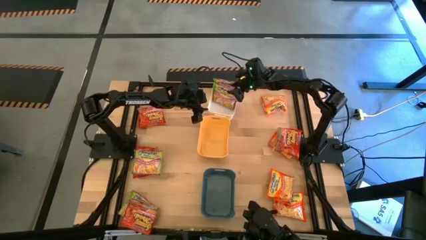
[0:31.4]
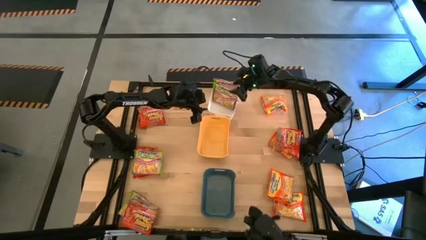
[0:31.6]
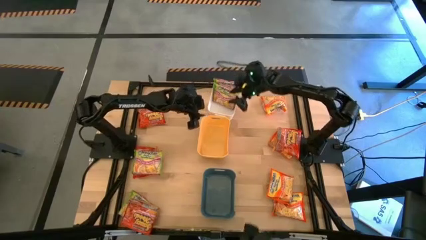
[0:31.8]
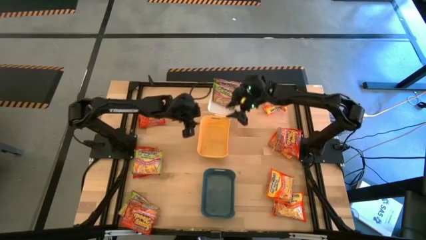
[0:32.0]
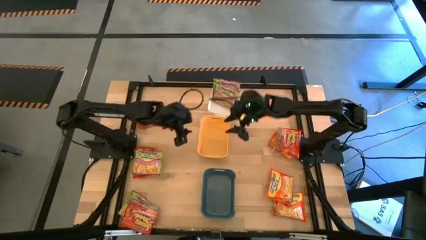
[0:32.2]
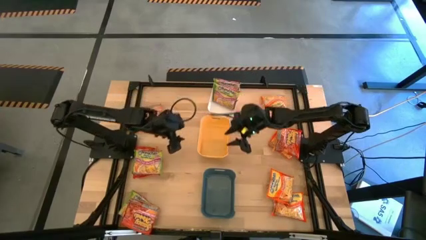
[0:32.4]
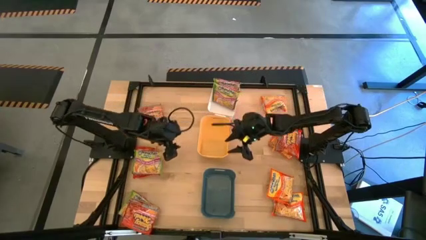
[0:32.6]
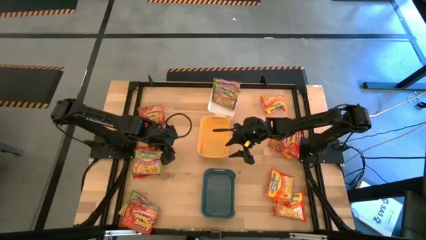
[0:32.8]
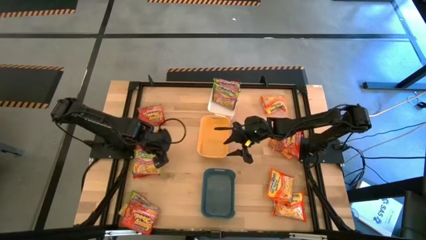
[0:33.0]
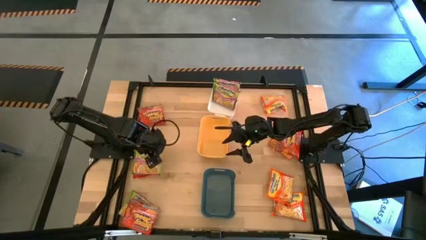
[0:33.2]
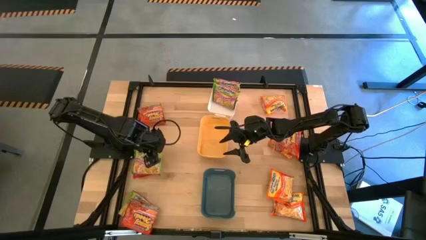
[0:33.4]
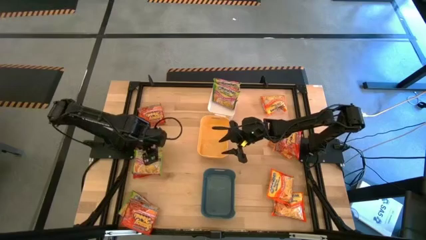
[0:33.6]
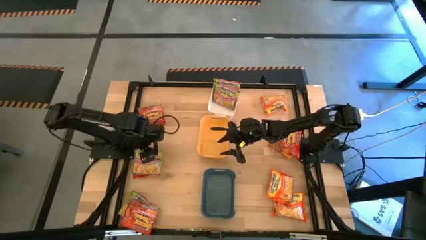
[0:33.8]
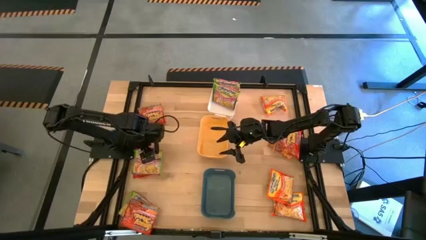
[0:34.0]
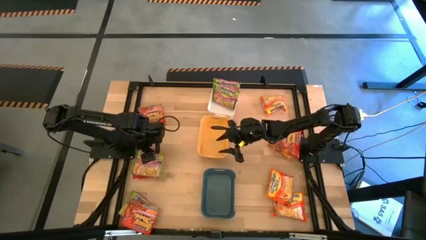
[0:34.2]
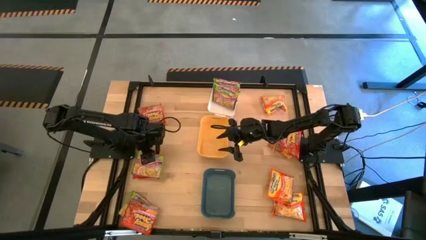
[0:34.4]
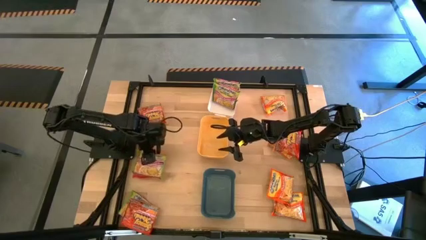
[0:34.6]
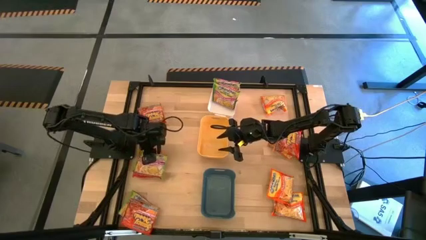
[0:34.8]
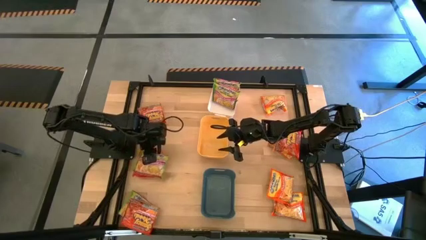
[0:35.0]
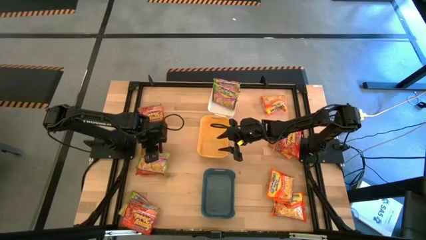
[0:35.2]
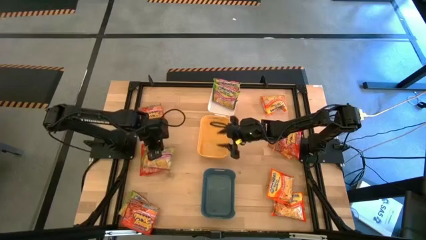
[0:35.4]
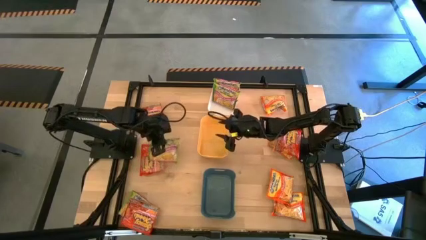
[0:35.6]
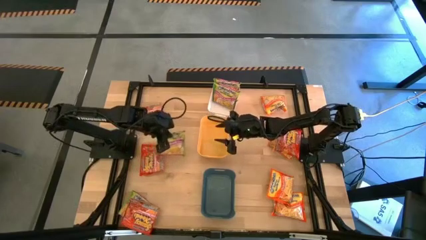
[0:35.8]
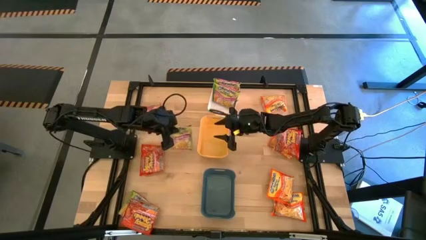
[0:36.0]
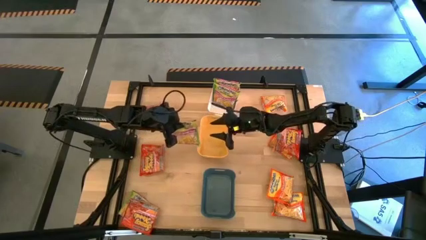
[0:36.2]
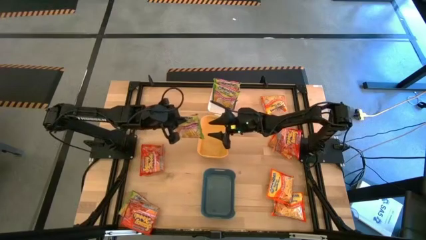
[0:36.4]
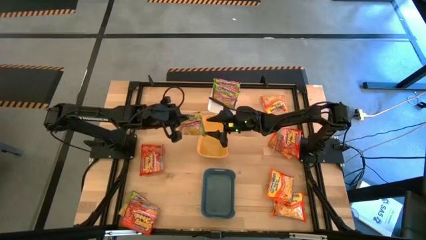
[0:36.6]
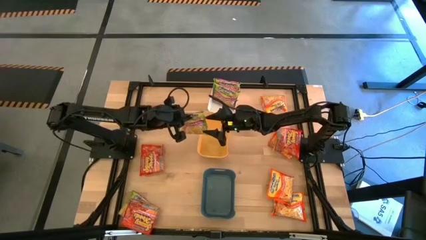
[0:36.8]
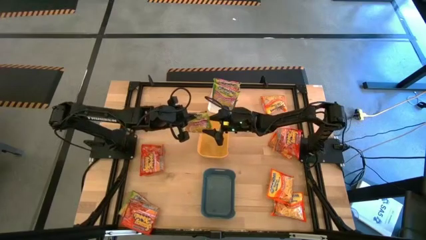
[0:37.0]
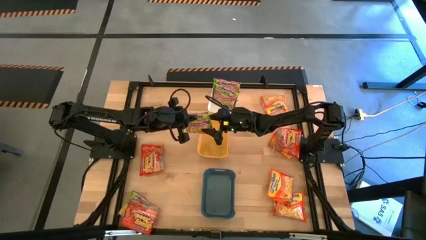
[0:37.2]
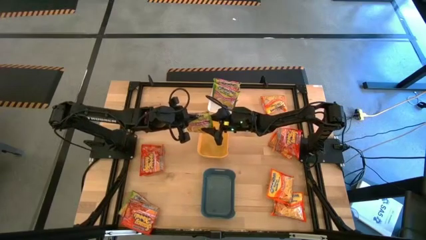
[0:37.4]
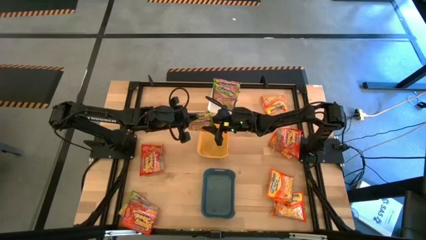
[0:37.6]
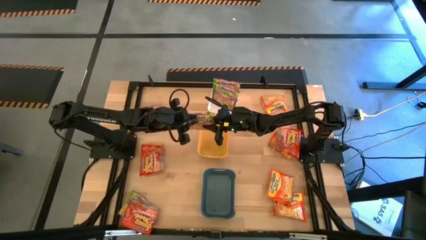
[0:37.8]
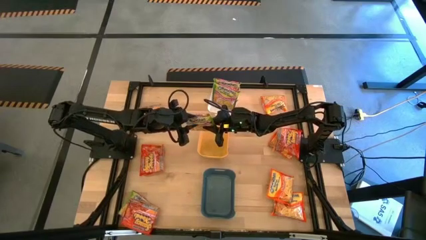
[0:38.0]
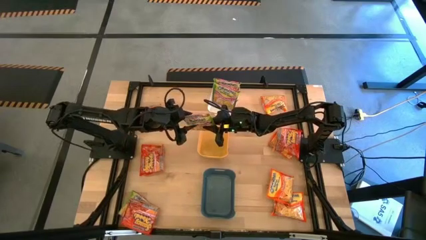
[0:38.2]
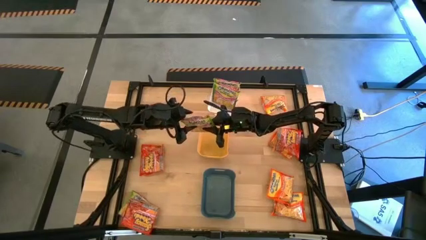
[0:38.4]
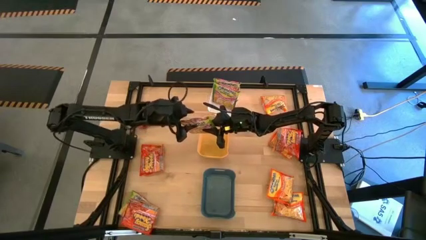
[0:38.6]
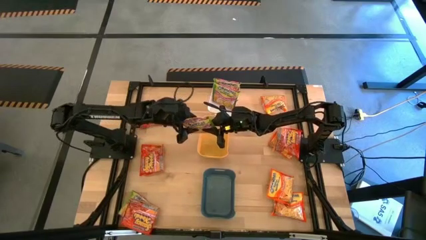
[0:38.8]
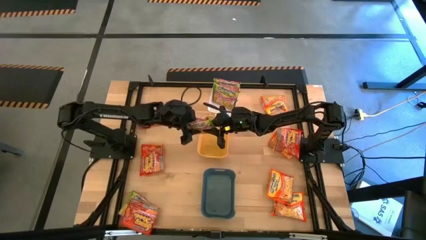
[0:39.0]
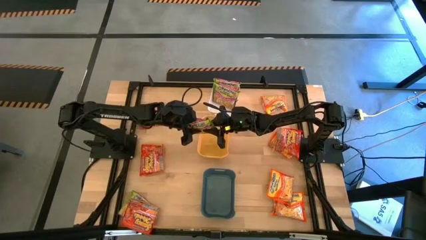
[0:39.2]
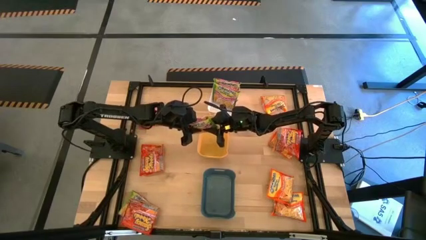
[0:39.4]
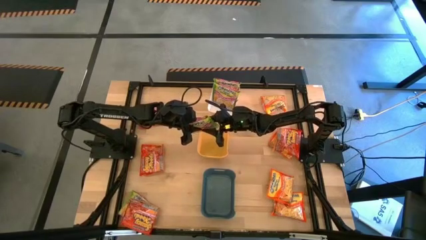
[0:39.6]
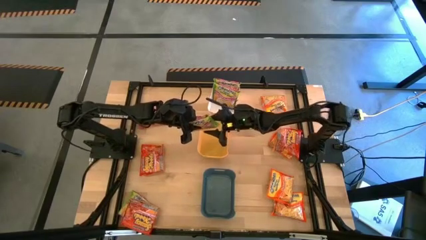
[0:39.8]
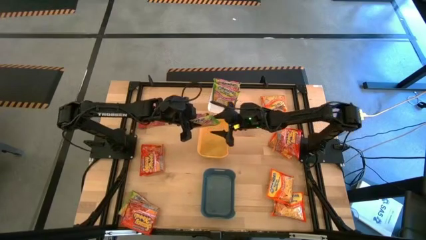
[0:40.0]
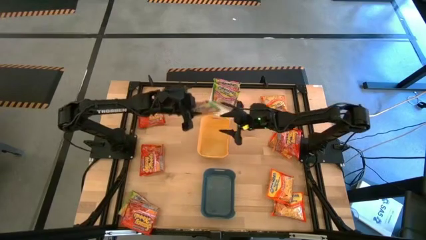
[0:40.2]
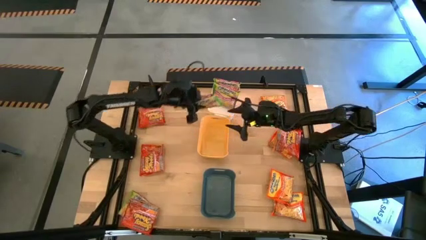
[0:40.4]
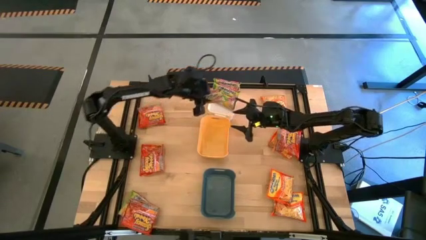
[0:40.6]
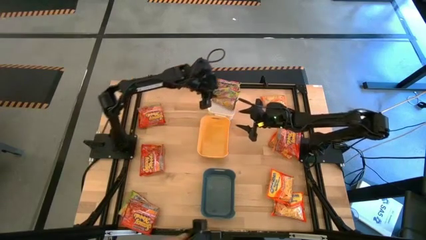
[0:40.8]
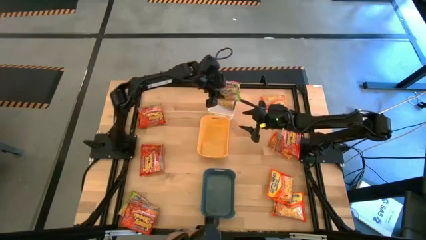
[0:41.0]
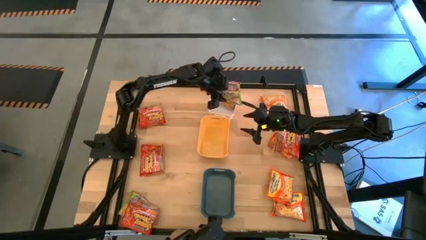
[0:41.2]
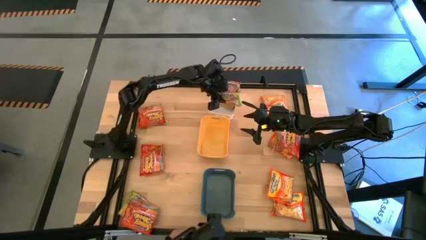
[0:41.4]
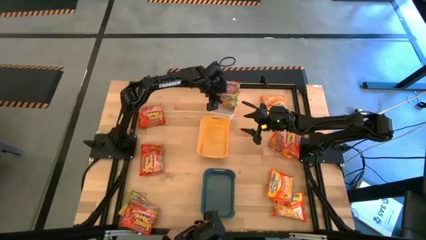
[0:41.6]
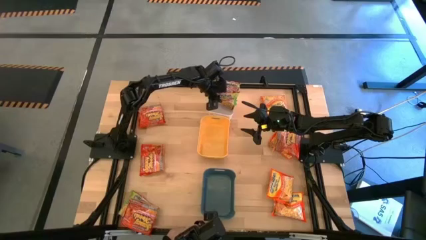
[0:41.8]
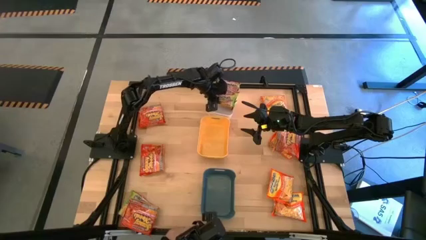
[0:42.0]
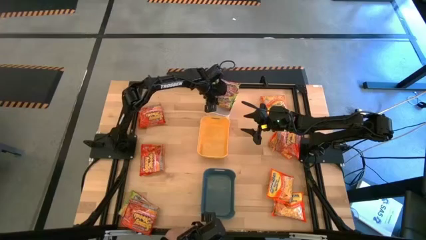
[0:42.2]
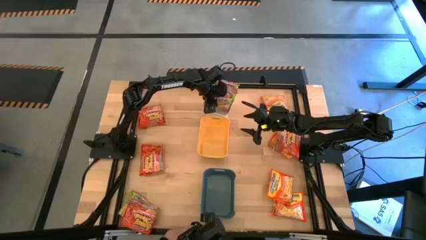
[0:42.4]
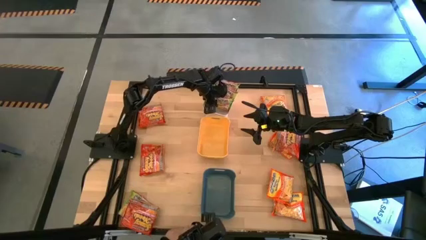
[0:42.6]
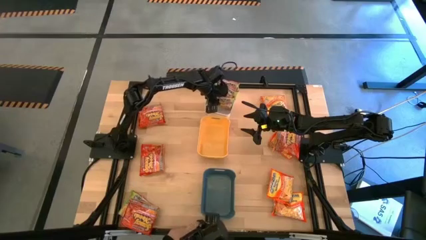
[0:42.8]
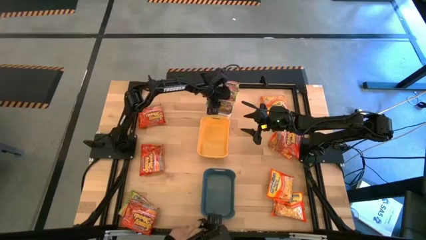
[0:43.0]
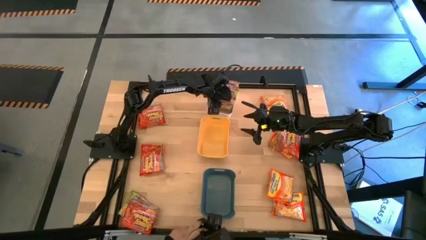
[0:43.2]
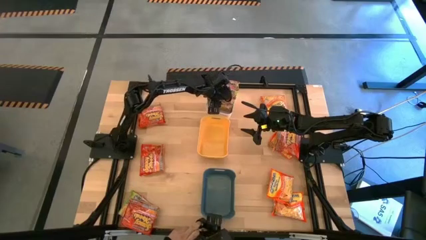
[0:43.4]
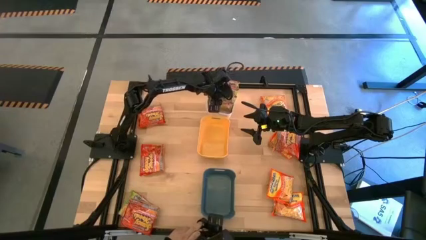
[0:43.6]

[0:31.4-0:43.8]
Task: Sort Maruchan noodles
Put the green noodle pack into the white bin
